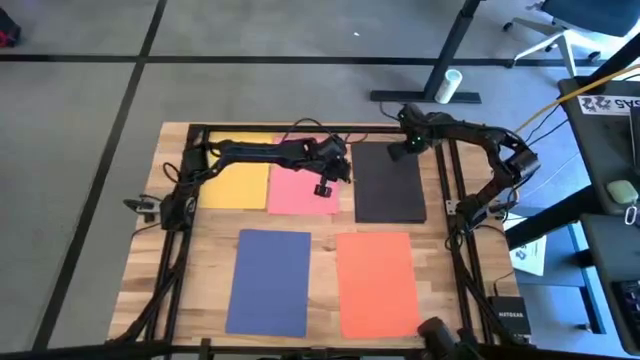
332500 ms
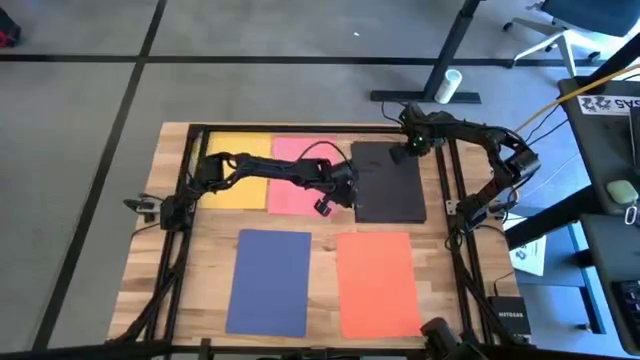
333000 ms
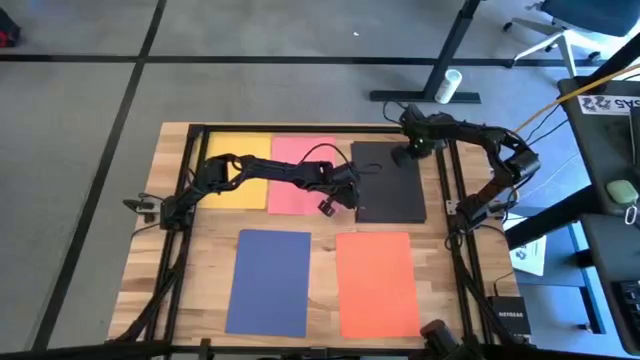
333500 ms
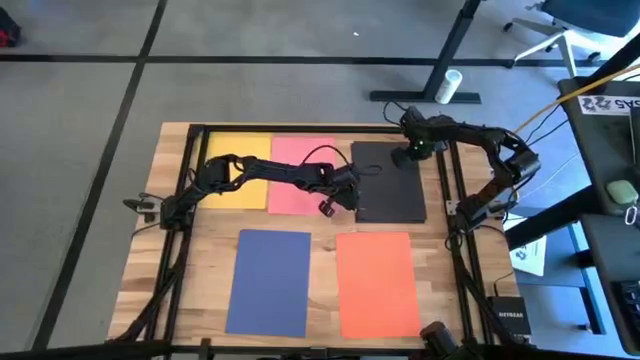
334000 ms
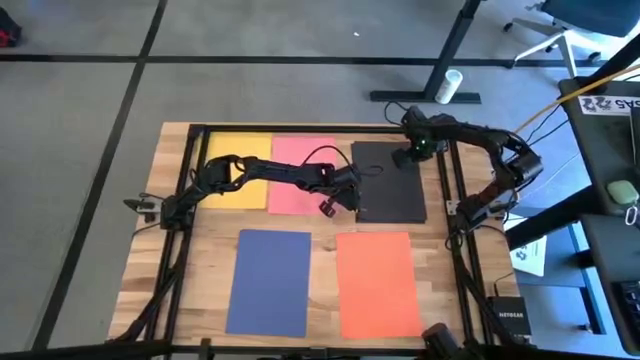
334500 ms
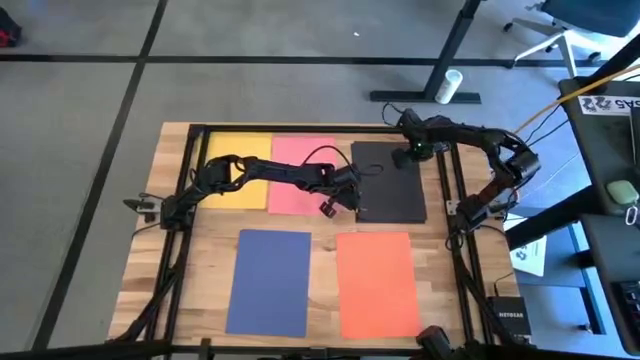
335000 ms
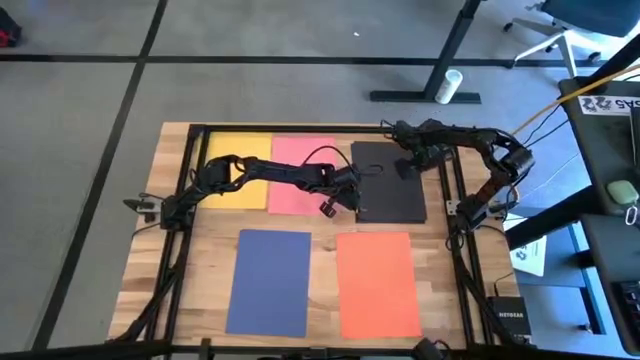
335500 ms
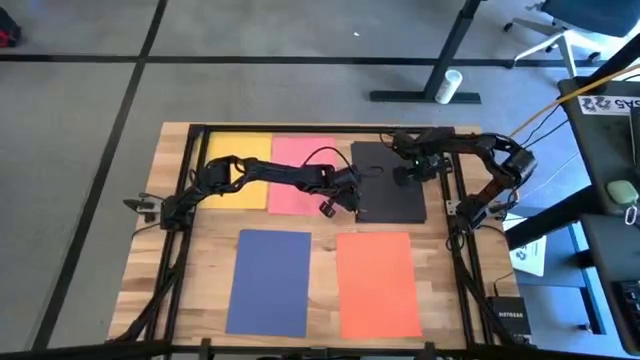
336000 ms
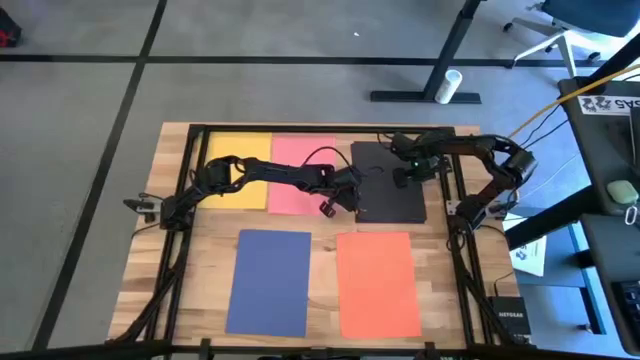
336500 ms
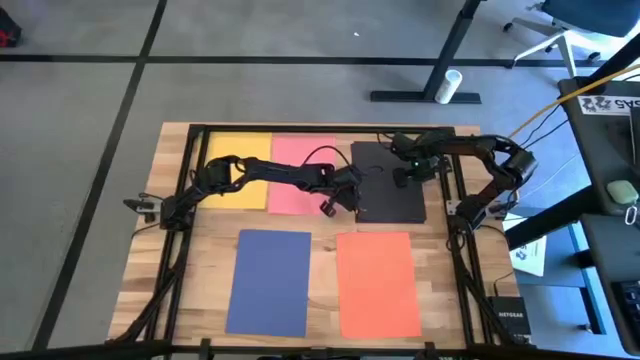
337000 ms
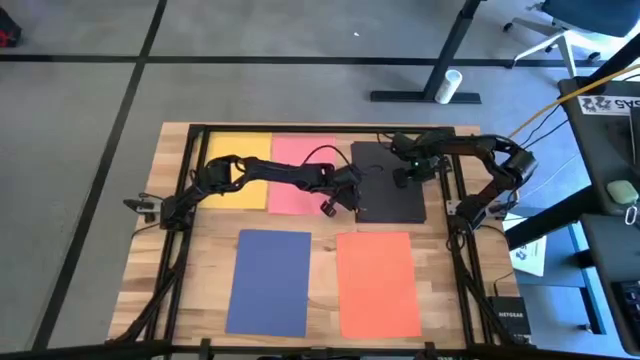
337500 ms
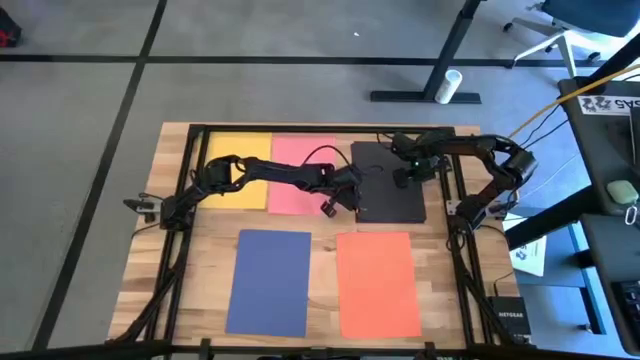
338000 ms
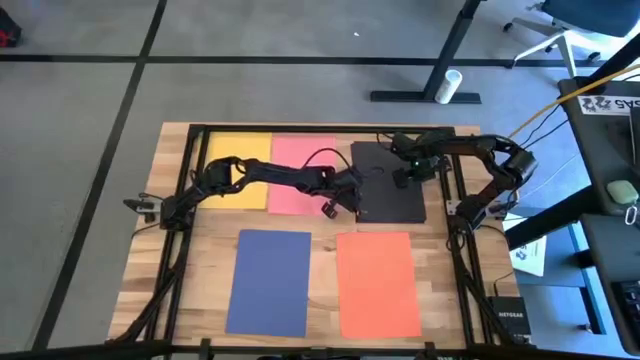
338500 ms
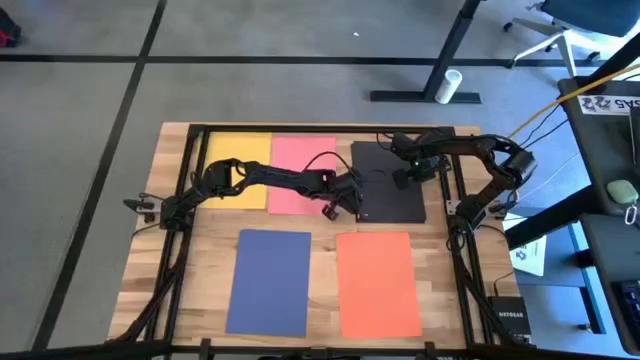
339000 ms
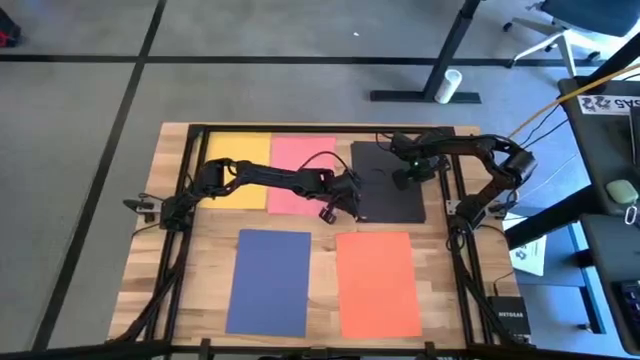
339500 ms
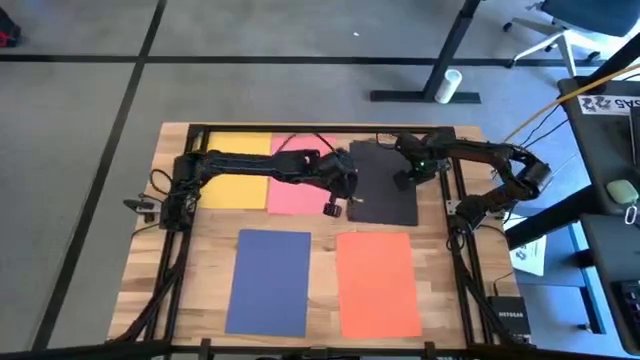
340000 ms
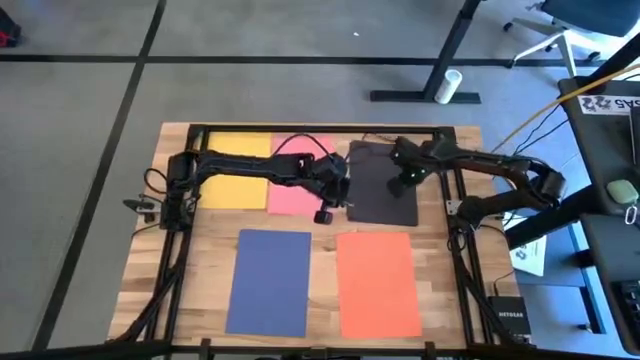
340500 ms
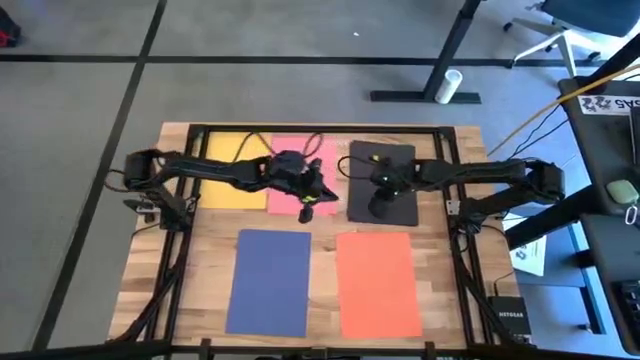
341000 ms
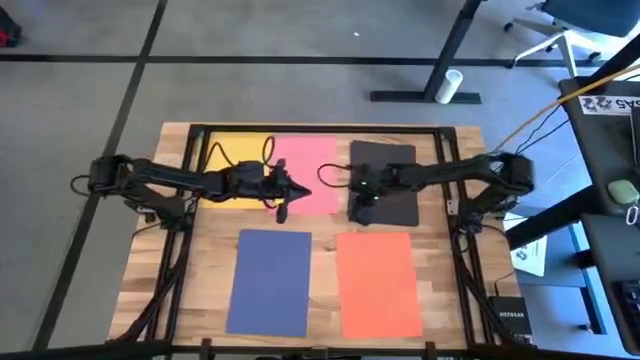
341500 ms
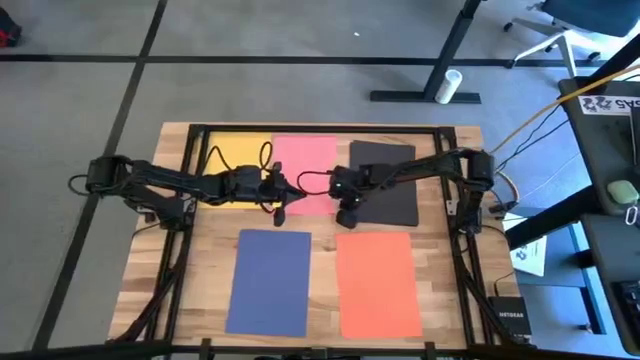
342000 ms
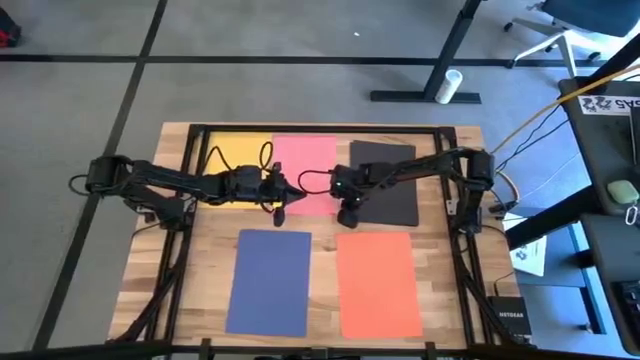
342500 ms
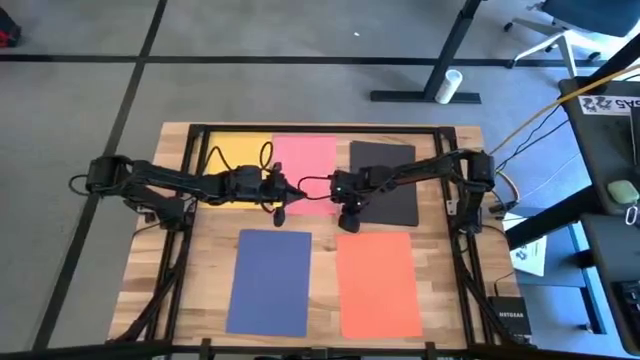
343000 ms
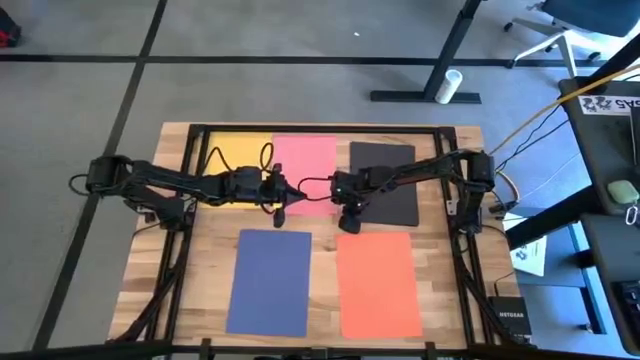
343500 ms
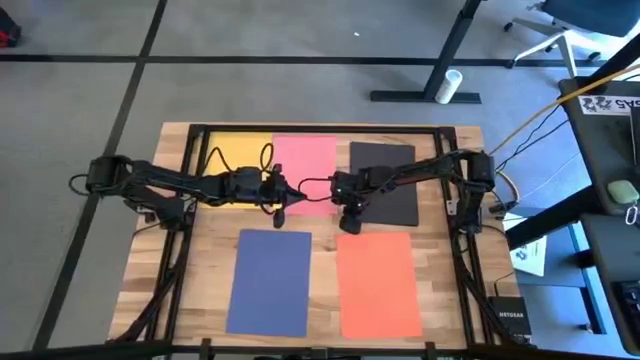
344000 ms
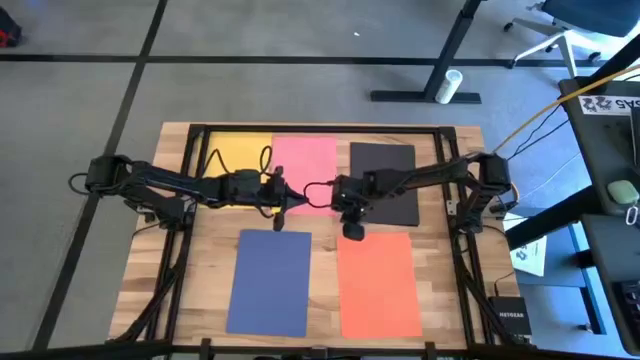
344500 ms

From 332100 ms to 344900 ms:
Task: Organize paper
Adjust the stacked black papers

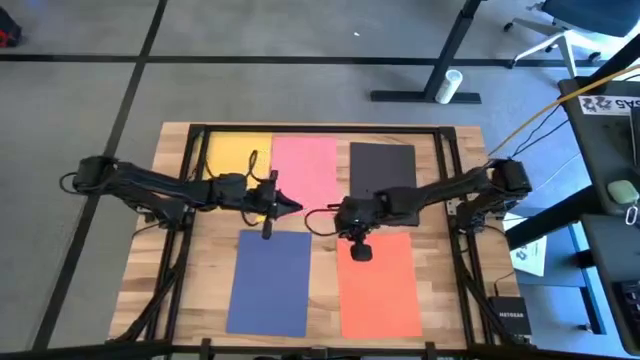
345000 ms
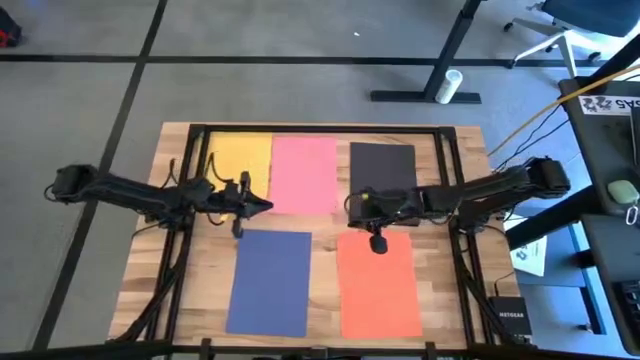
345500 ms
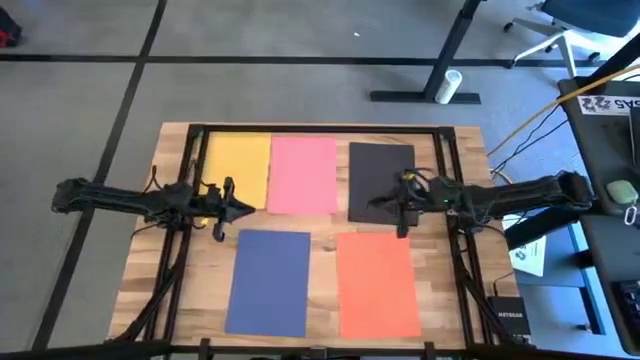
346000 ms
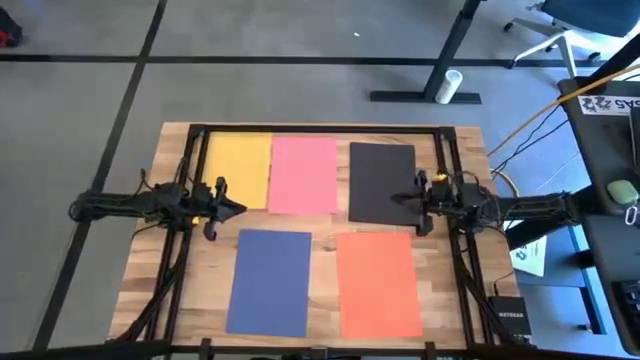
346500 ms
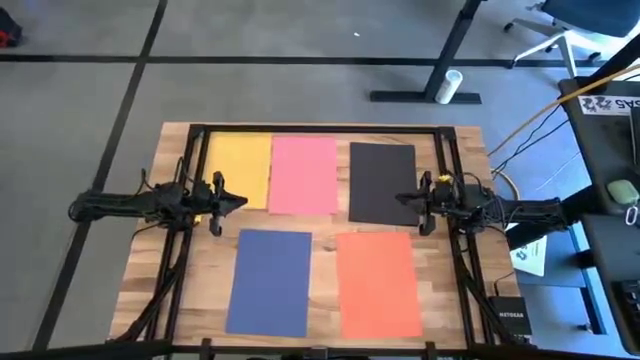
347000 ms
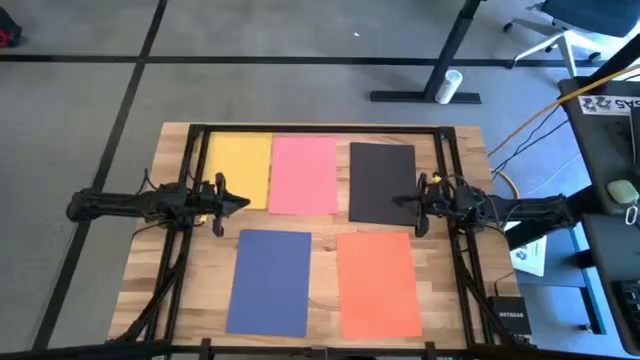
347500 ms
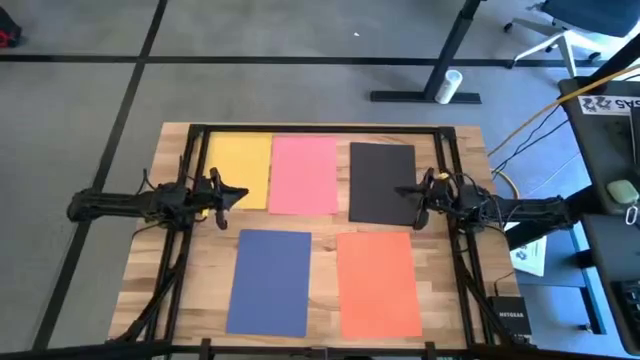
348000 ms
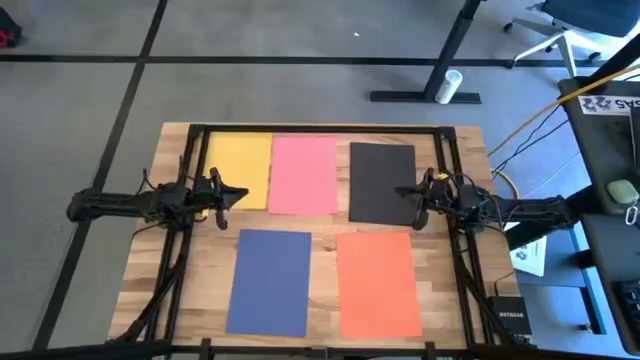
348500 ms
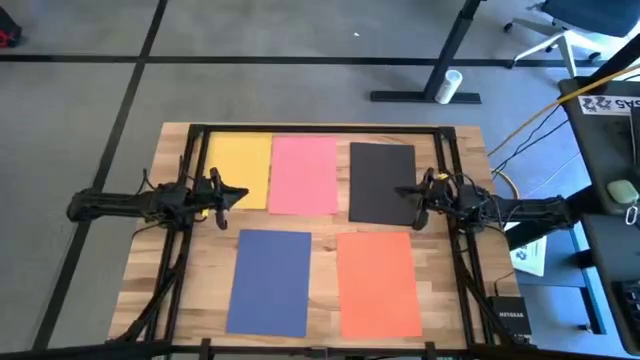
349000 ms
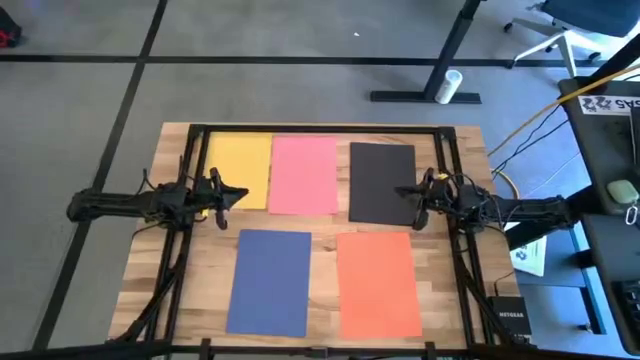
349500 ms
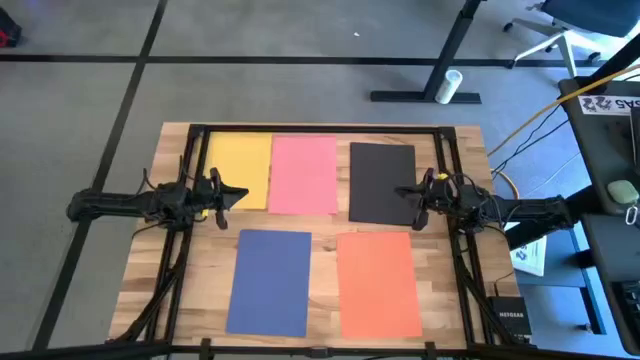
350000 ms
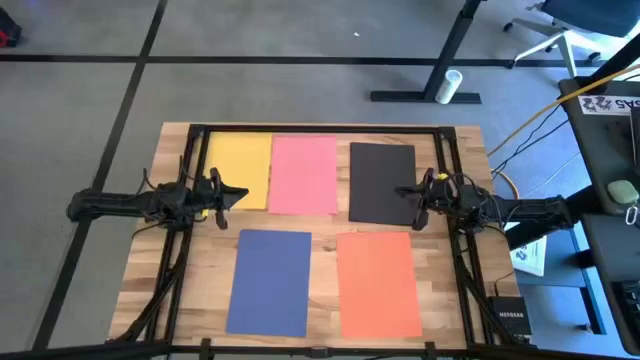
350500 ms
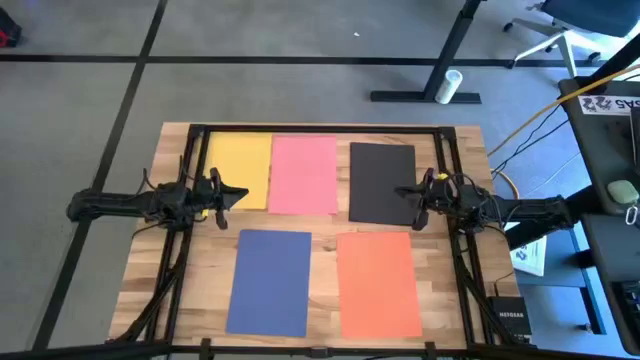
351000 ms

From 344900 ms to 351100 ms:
Return to Home Position
